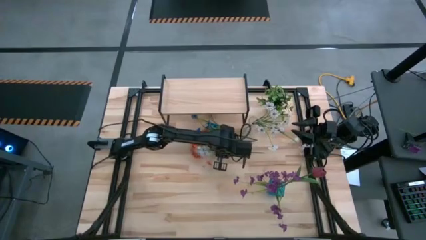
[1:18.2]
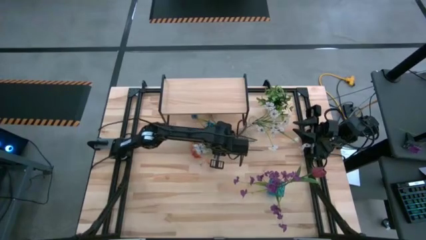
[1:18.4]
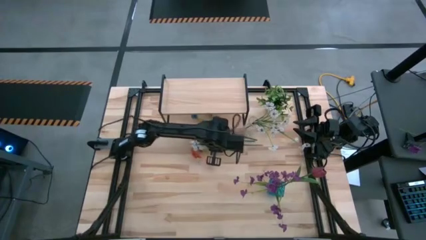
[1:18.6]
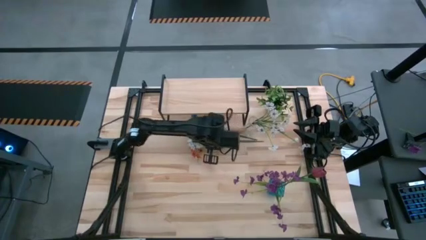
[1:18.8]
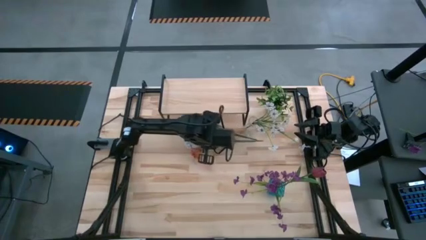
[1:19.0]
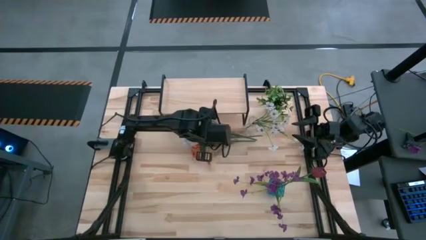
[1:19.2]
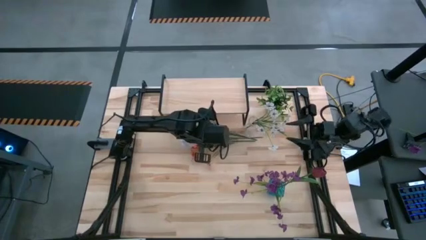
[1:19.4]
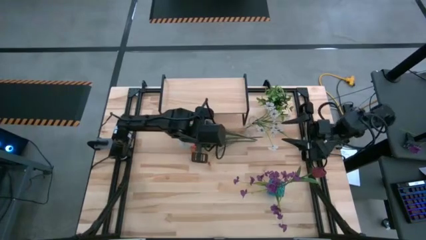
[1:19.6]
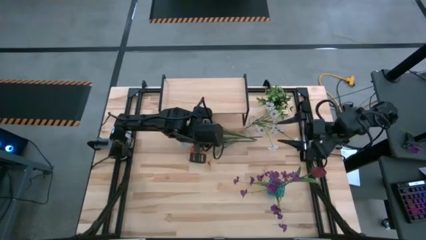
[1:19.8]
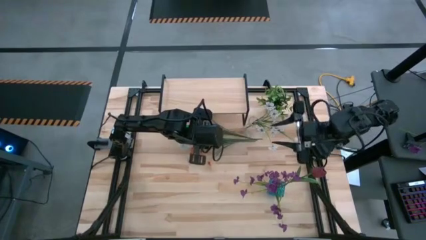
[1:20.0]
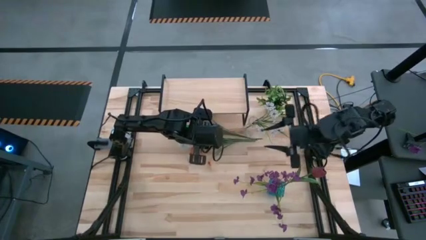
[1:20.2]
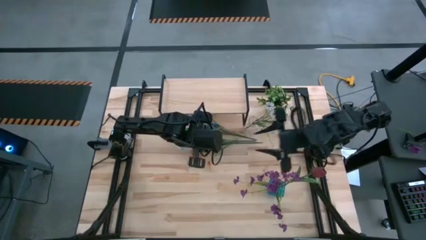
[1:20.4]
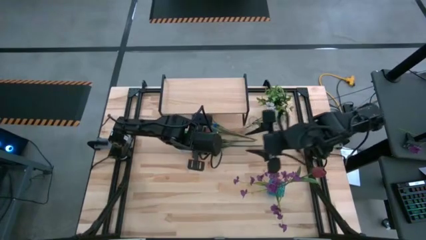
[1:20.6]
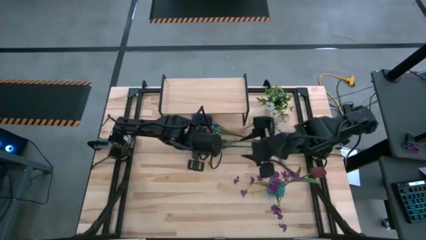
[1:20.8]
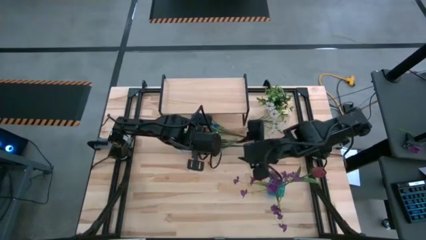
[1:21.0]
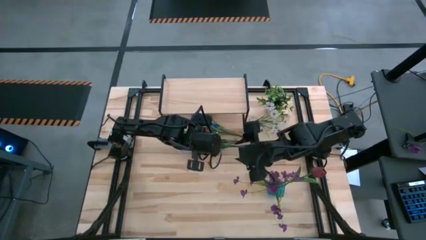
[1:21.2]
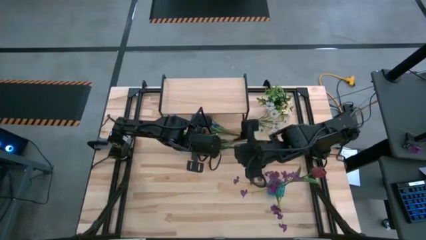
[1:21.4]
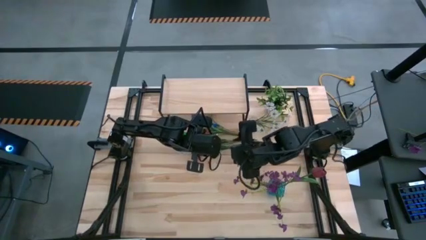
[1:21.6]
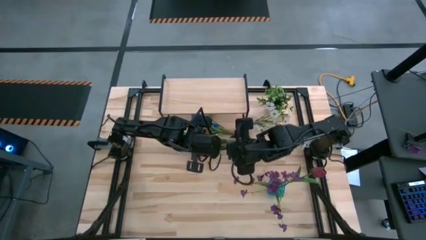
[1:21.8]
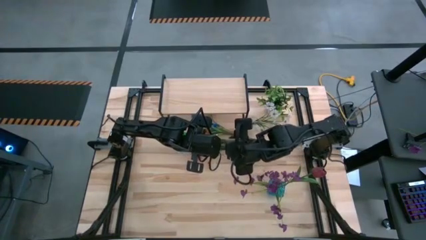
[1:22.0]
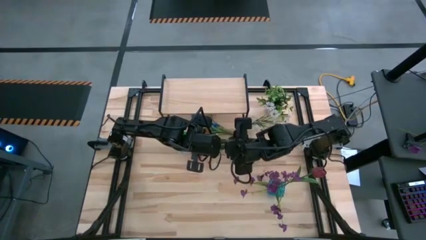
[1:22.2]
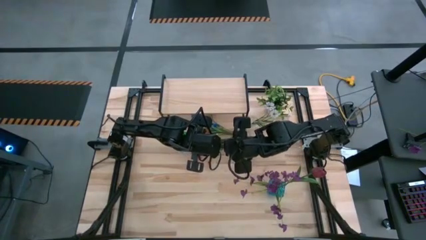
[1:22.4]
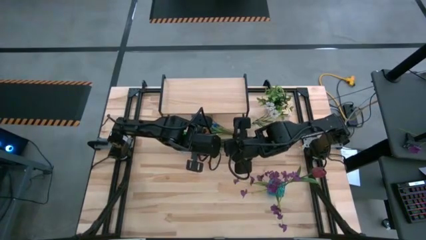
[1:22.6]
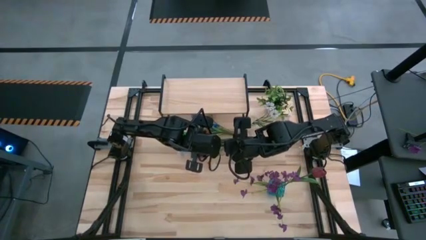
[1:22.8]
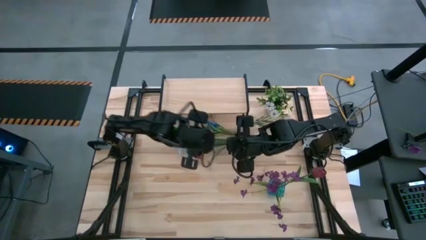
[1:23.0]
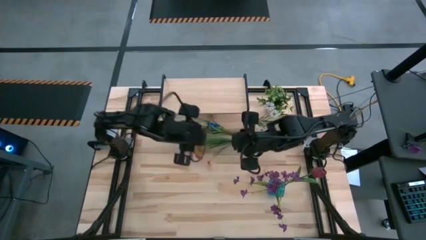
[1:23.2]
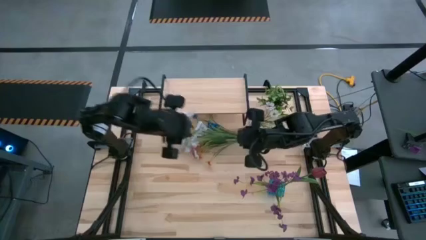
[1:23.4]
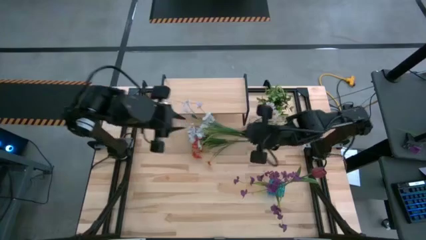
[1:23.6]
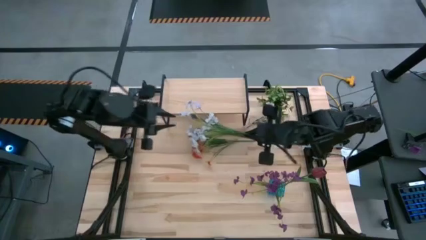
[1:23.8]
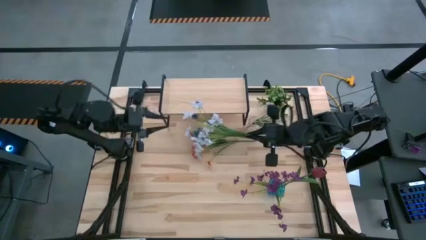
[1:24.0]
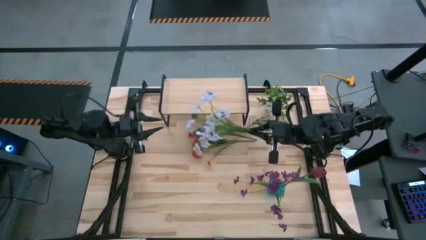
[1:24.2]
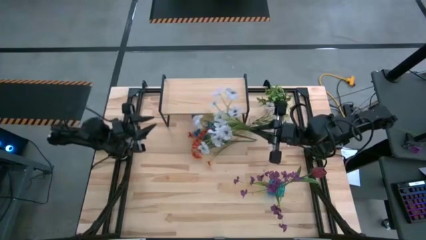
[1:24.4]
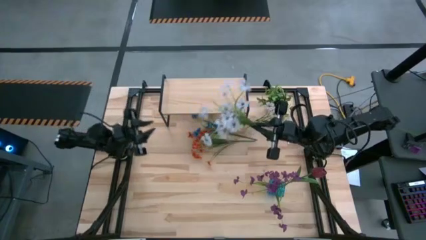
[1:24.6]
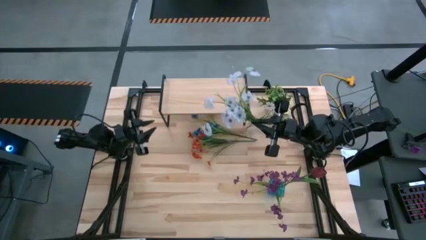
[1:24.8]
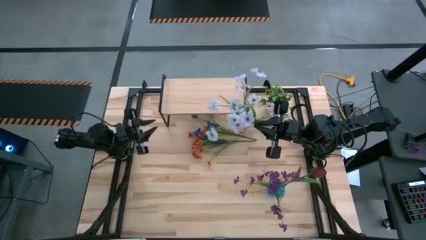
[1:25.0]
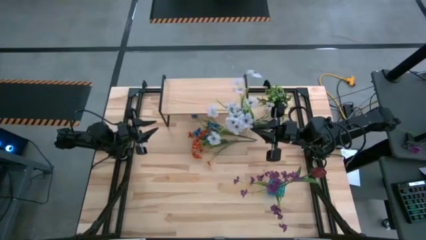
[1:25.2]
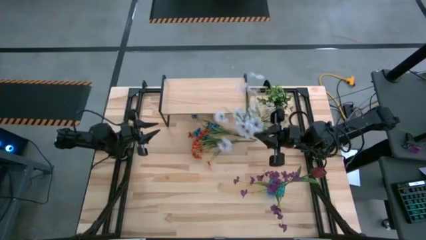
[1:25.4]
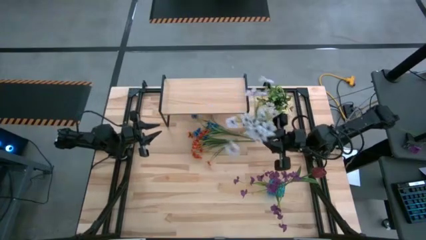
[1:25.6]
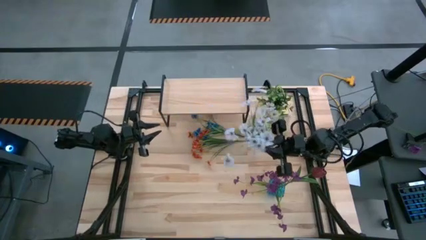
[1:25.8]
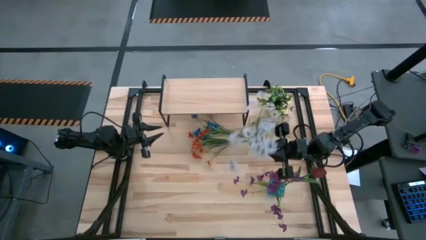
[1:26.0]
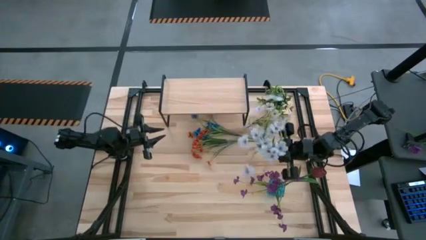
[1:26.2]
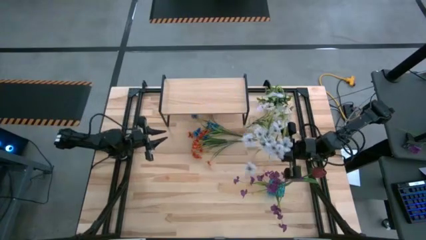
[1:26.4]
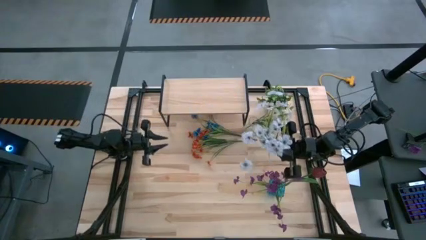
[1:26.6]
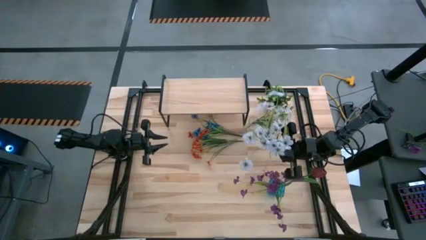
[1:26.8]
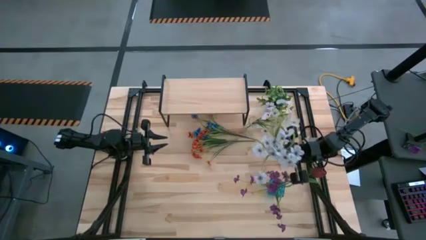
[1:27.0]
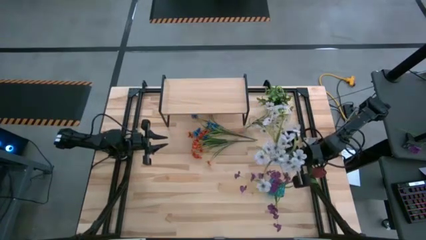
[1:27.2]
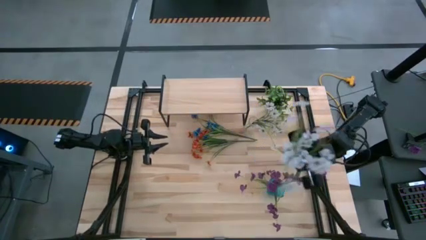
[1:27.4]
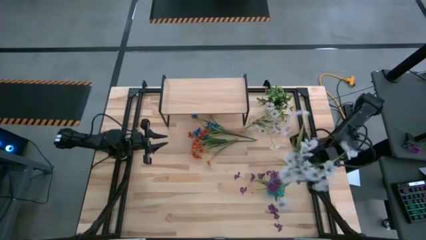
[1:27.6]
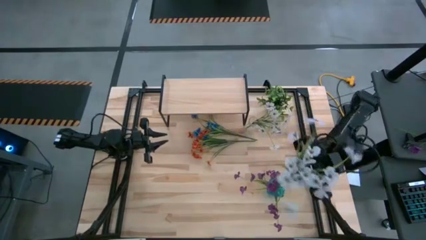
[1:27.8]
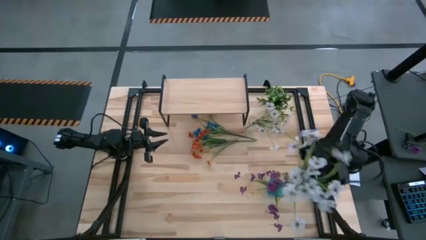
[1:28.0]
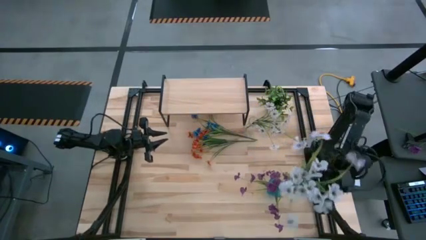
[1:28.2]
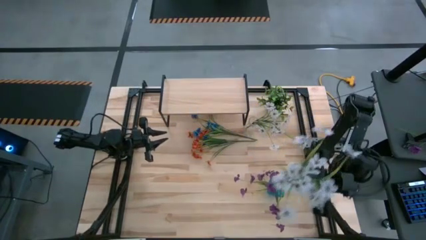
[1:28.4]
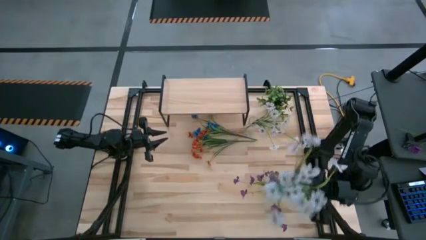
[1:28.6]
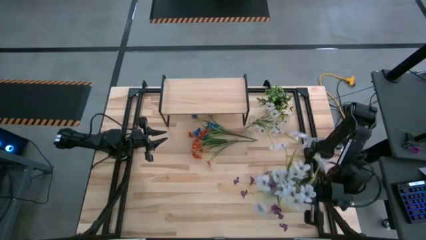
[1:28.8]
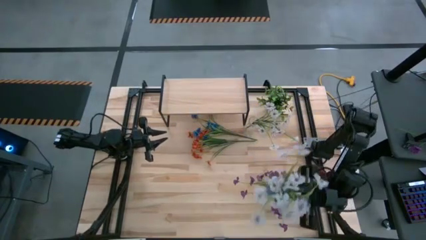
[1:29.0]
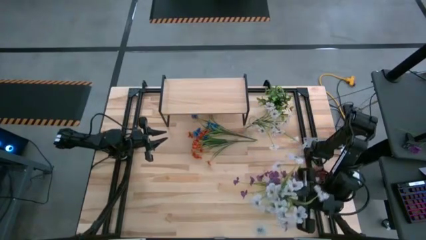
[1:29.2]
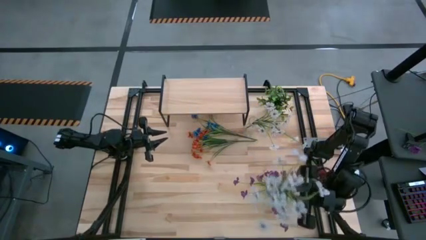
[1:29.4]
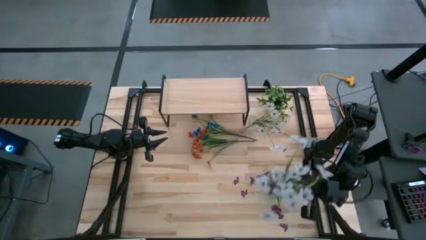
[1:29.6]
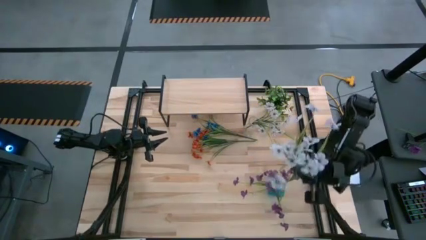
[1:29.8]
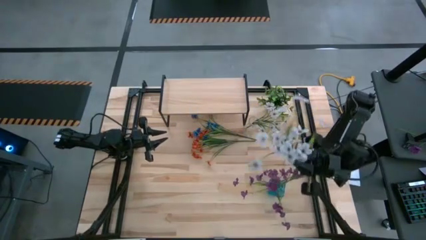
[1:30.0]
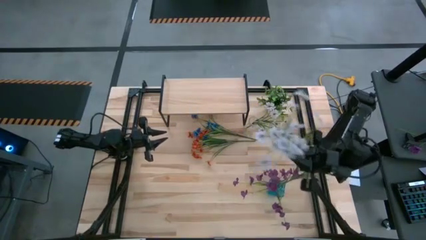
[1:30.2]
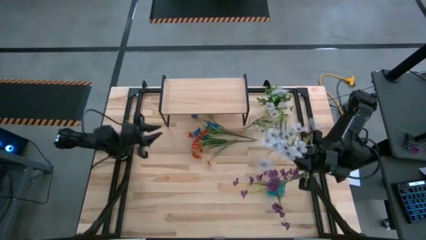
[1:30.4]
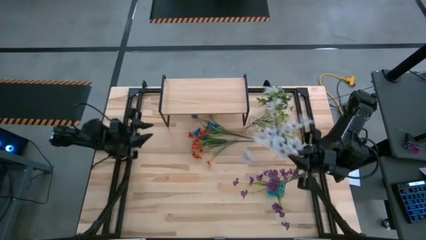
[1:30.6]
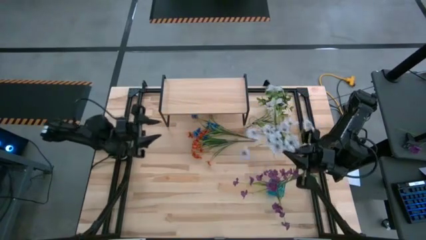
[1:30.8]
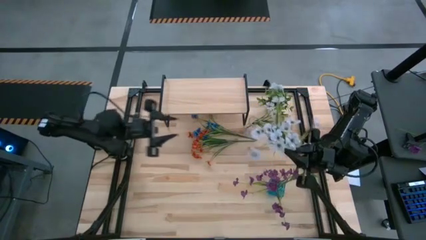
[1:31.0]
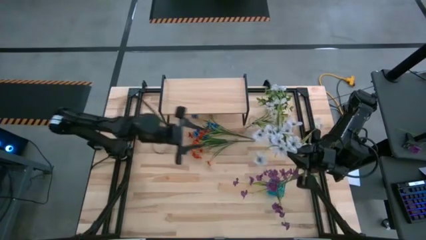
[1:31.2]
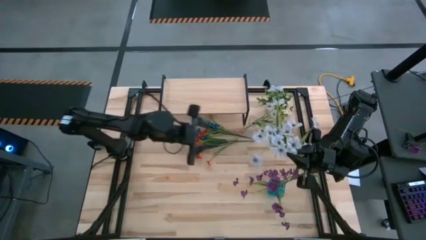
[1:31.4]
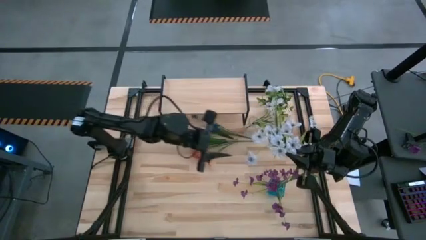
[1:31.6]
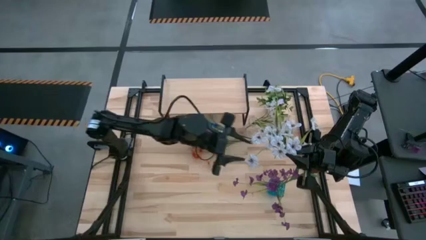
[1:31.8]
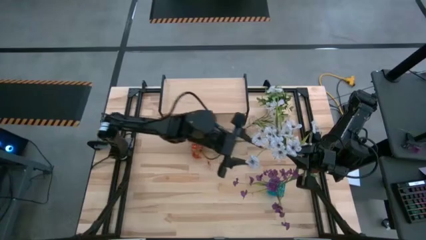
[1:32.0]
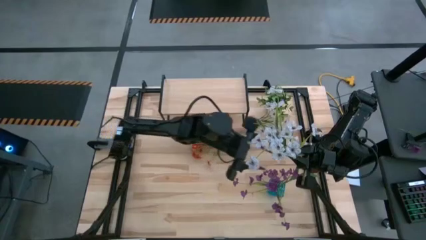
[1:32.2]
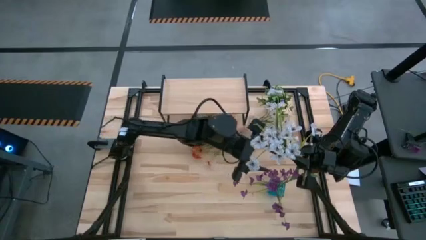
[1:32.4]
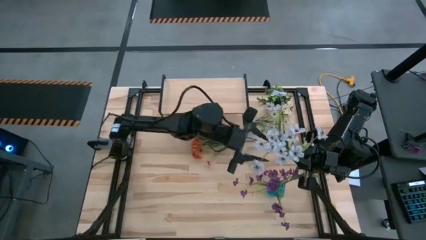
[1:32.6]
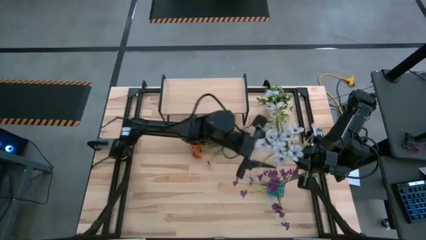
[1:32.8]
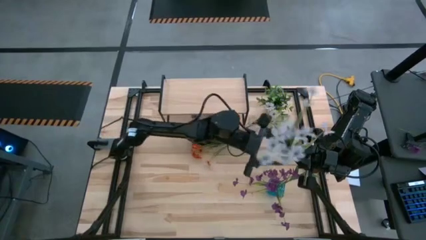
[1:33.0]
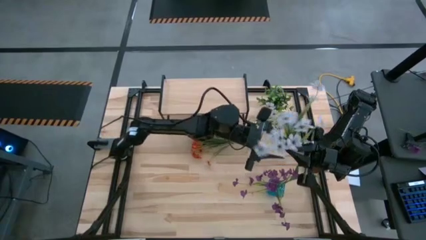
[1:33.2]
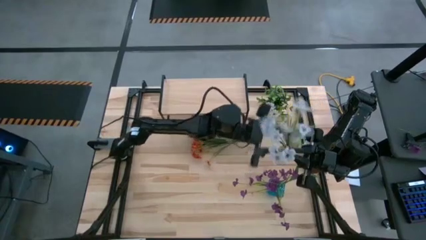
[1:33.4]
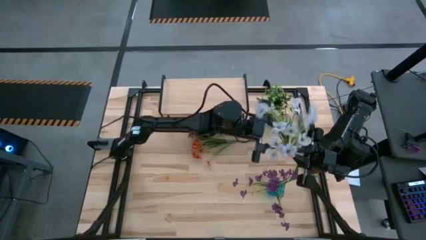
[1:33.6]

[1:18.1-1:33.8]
Task: Pick and place flowers into a vace then onto a shelf
Put the white flowers into the blue flower vase
